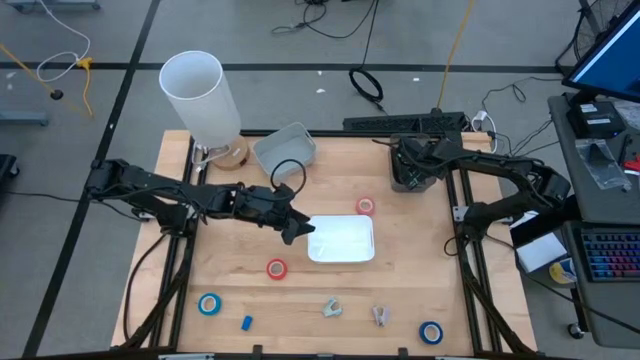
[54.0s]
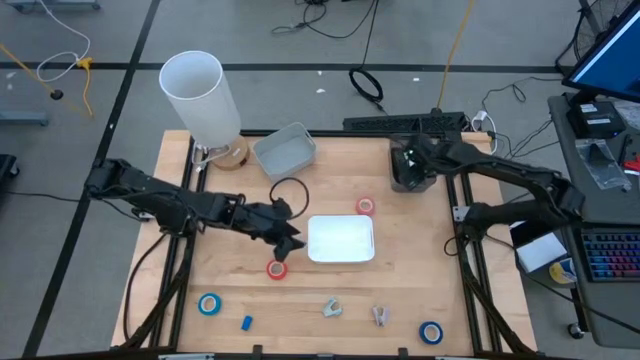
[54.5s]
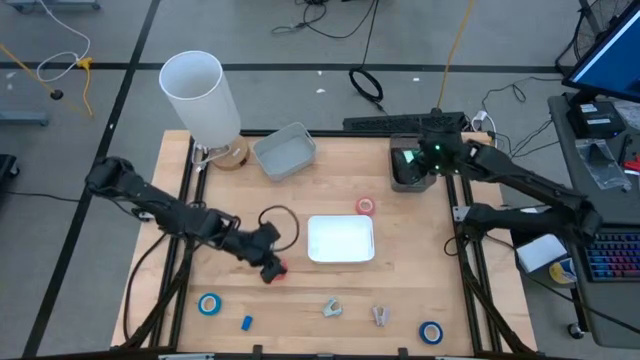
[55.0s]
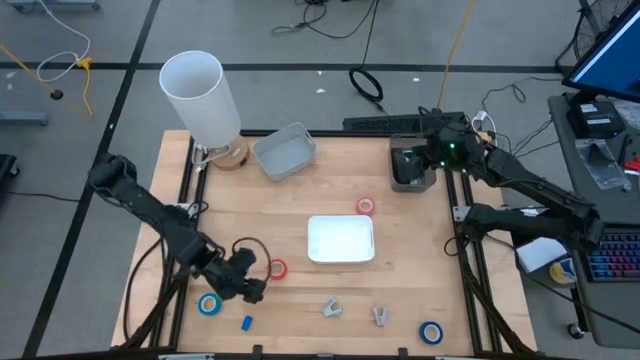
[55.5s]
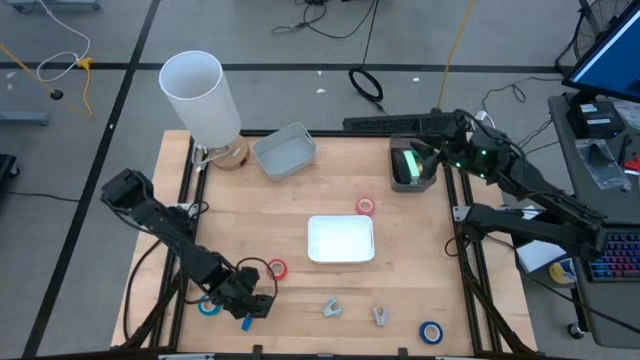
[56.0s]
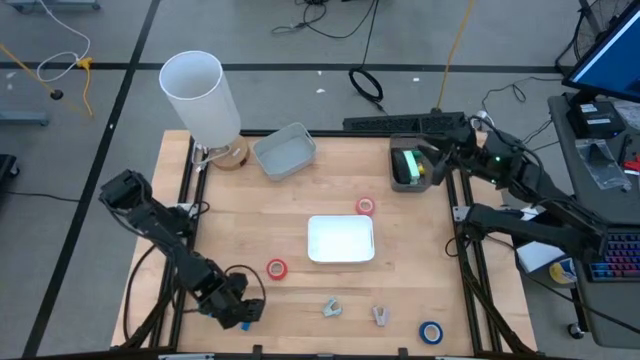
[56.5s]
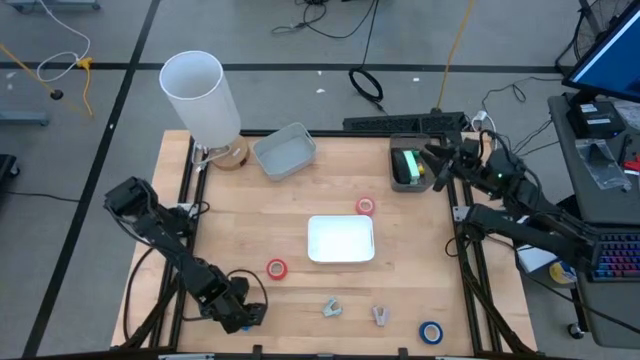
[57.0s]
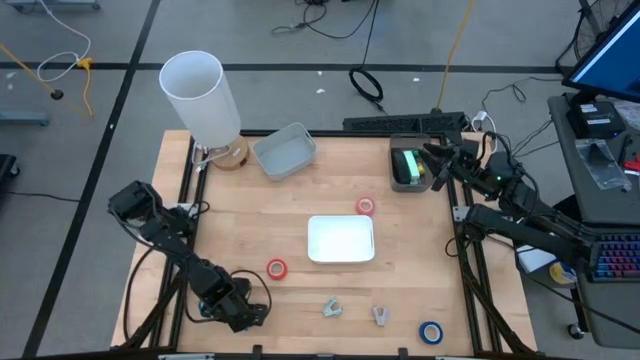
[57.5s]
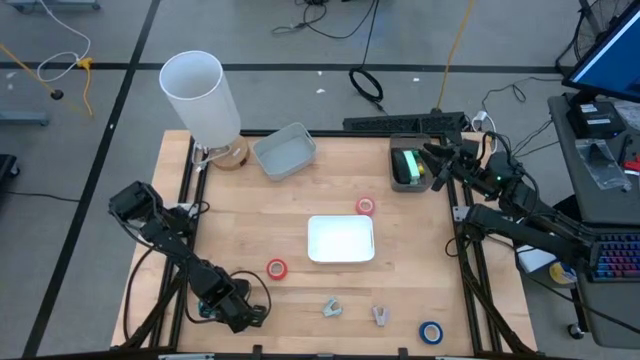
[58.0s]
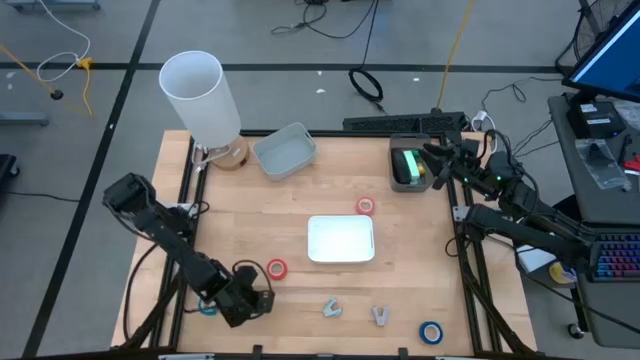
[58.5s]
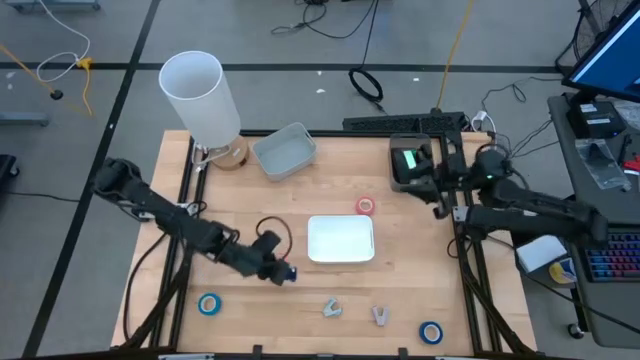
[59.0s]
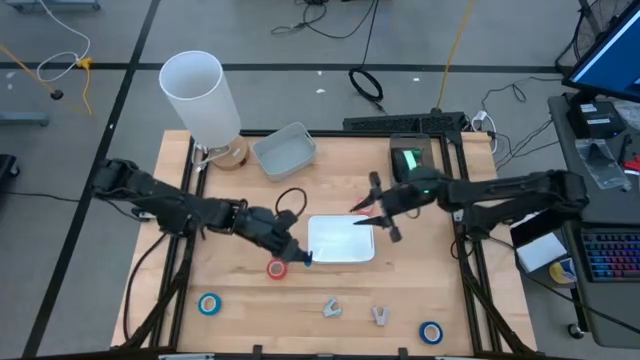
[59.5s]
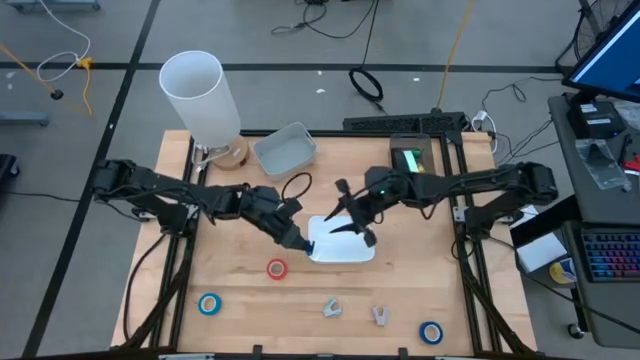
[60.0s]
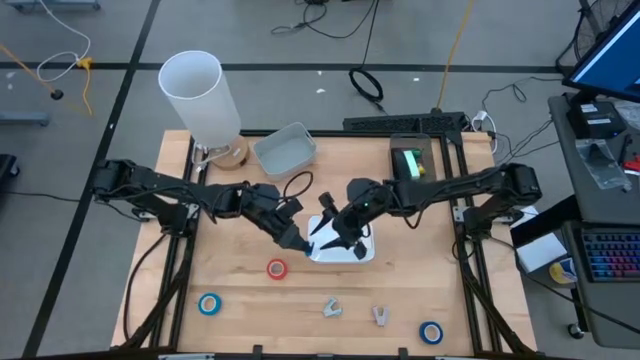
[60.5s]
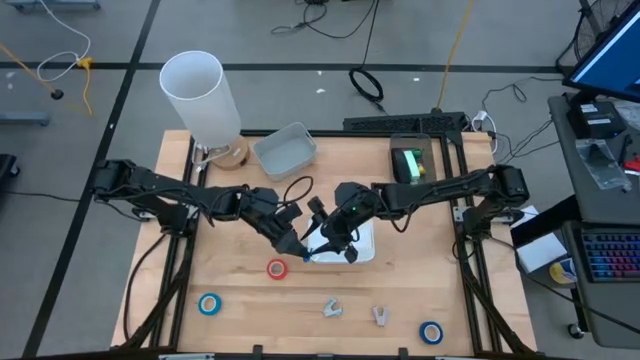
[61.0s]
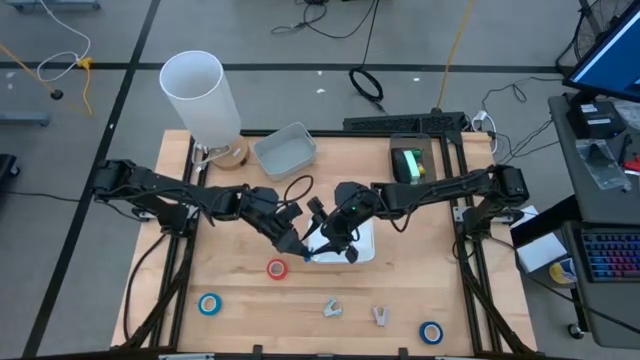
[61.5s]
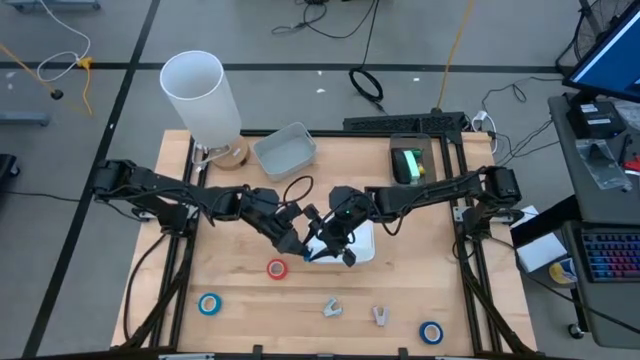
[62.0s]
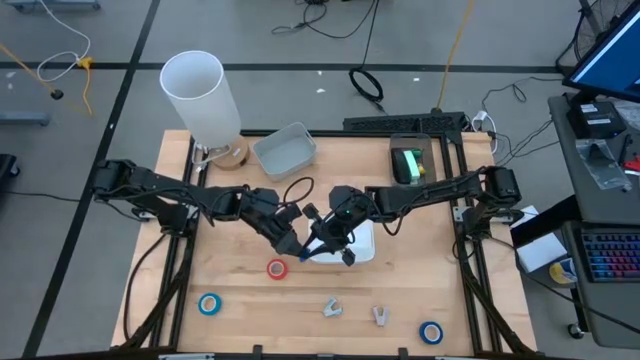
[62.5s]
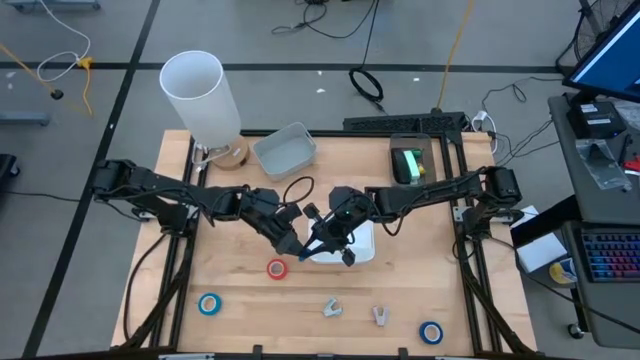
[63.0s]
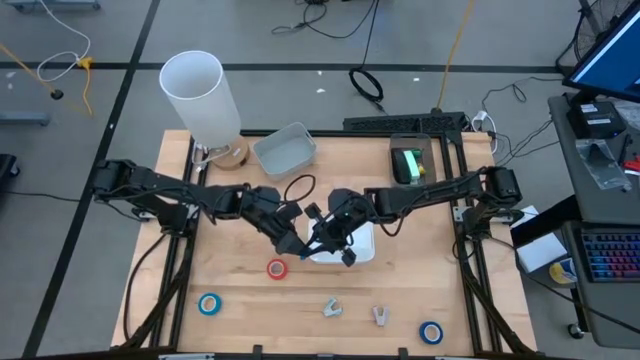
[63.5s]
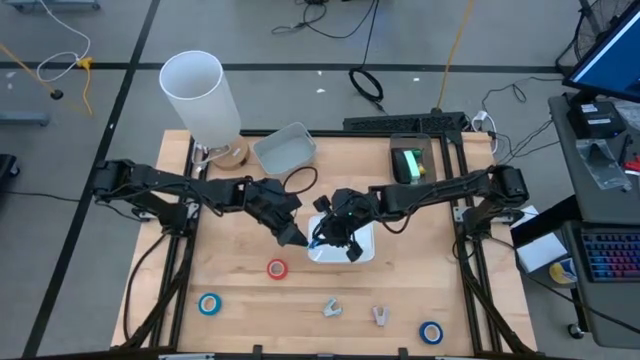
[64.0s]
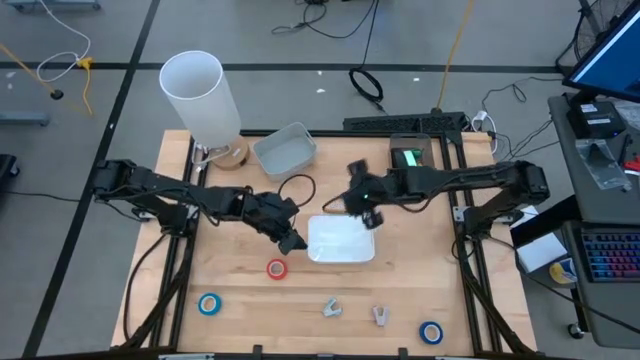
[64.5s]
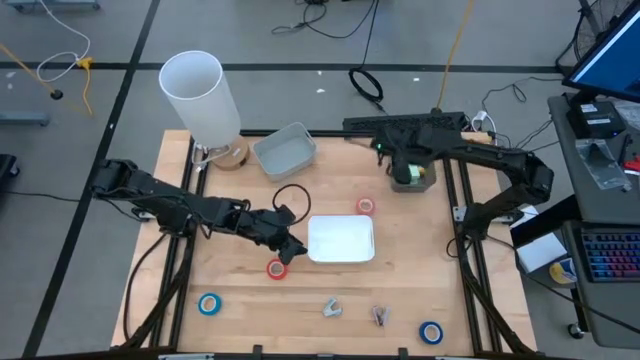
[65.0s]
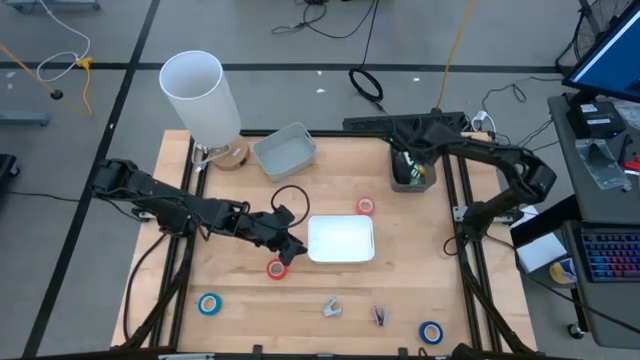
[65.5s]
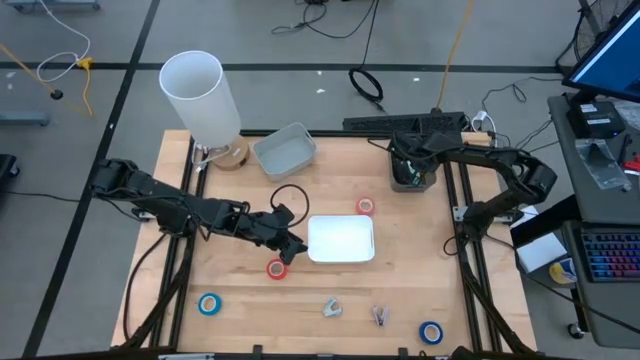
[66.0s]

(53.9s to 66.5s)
Task: Pick and place Stapler, Stapler remover, tape
Put the blue stapler into the black bin

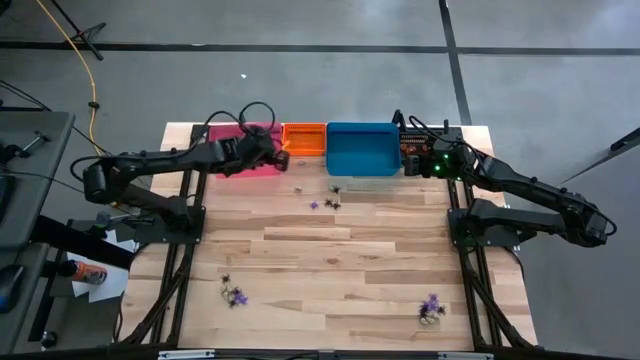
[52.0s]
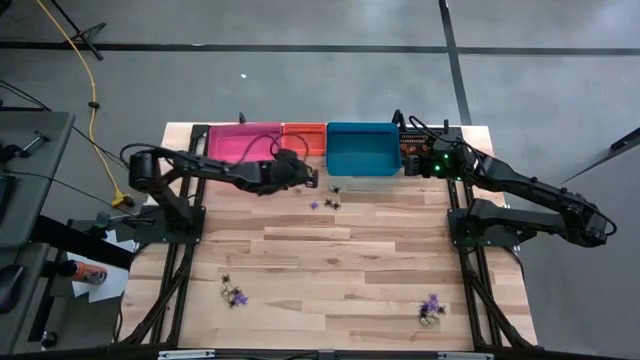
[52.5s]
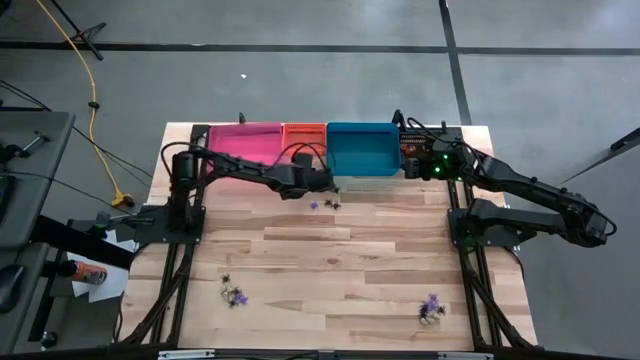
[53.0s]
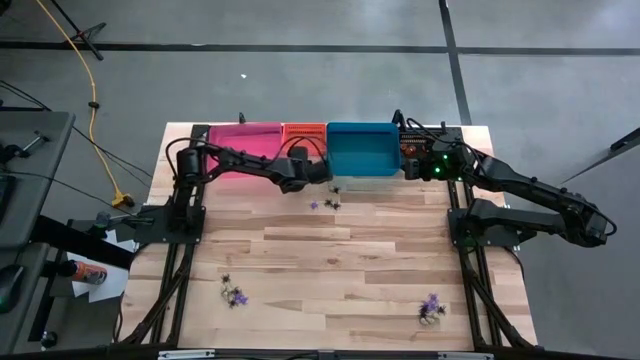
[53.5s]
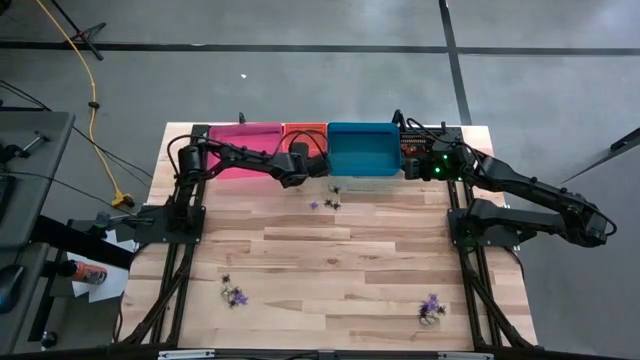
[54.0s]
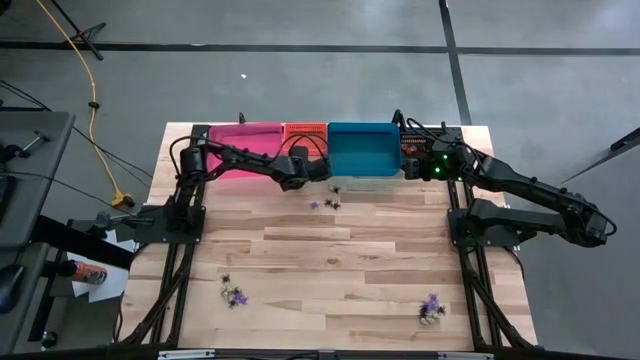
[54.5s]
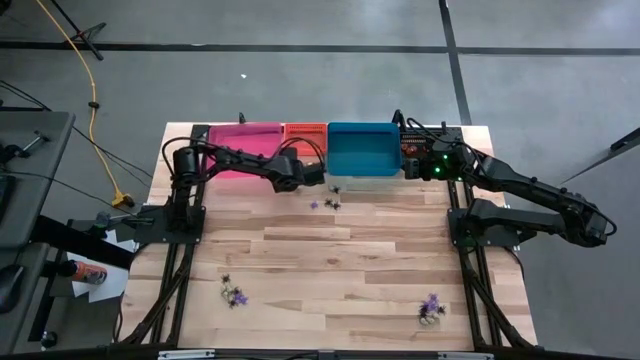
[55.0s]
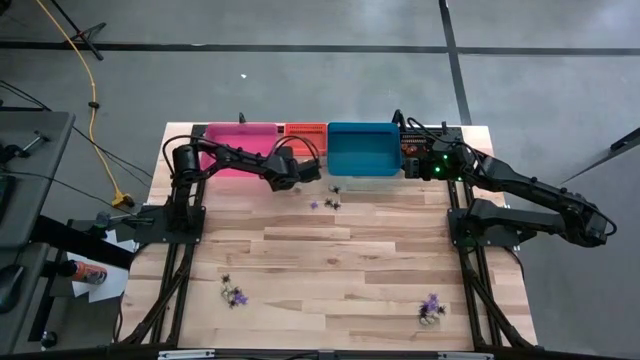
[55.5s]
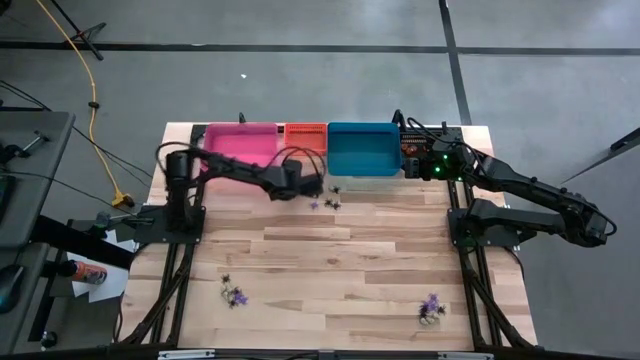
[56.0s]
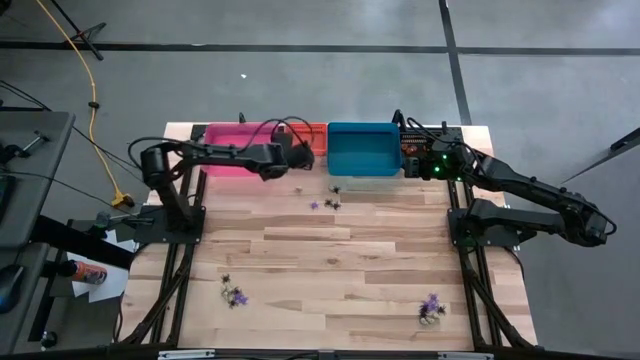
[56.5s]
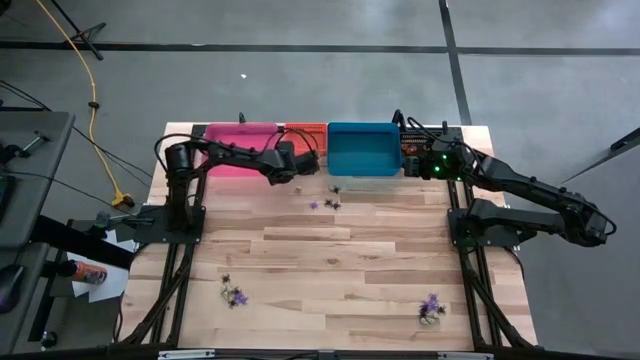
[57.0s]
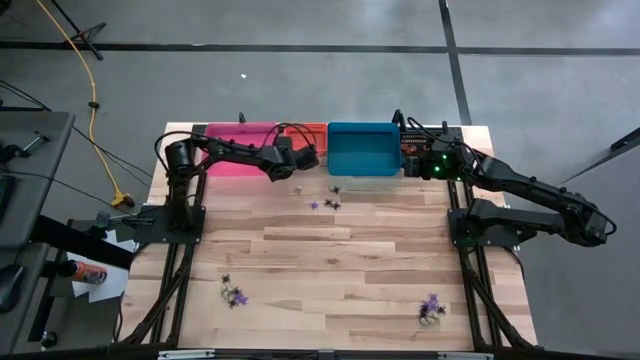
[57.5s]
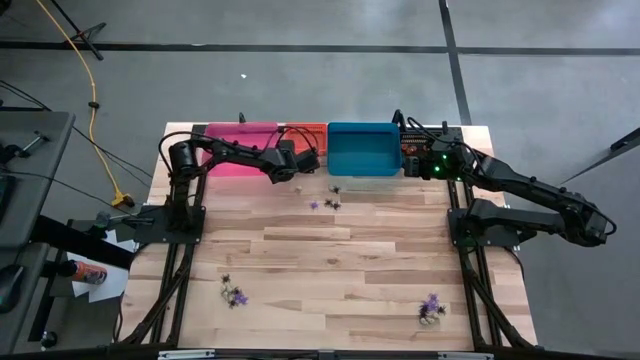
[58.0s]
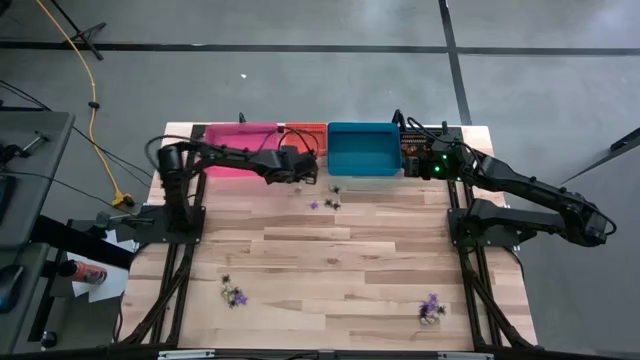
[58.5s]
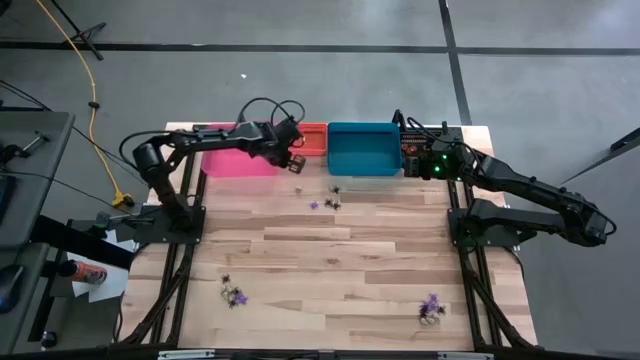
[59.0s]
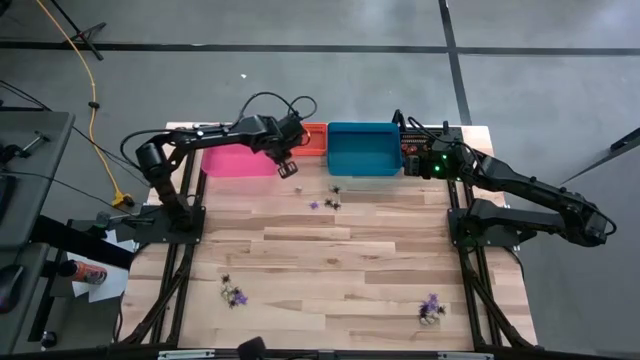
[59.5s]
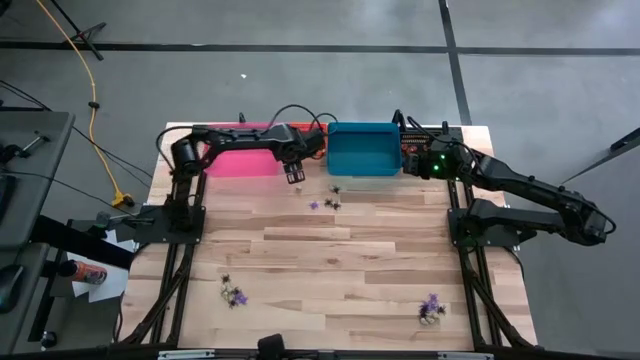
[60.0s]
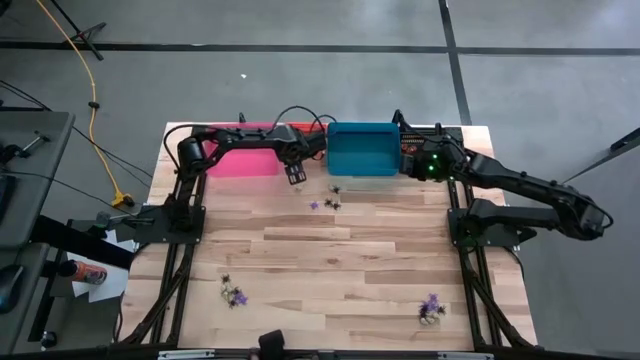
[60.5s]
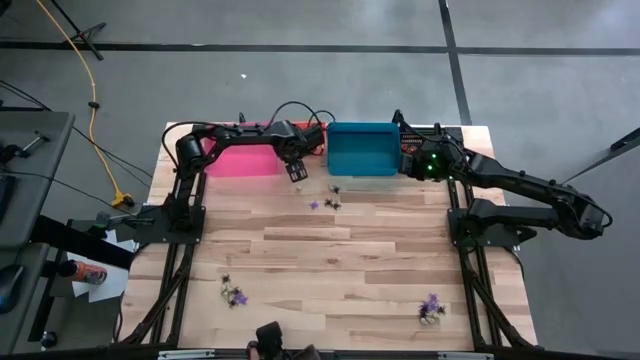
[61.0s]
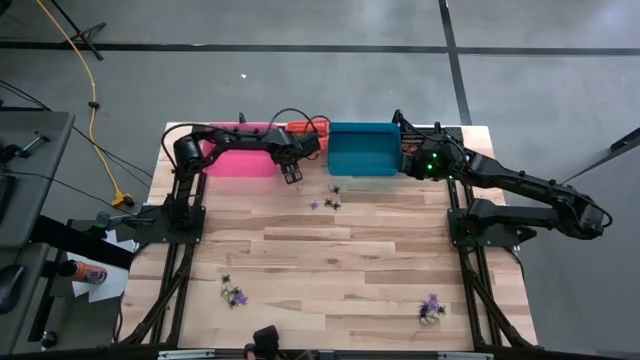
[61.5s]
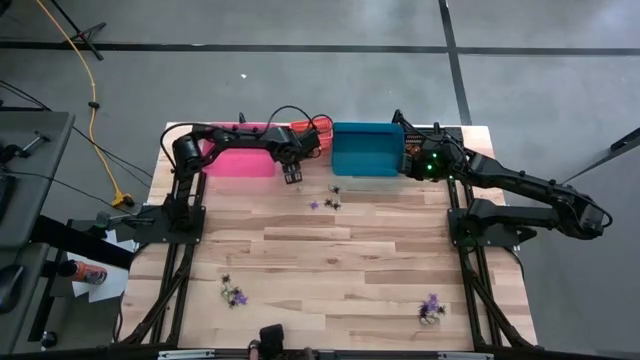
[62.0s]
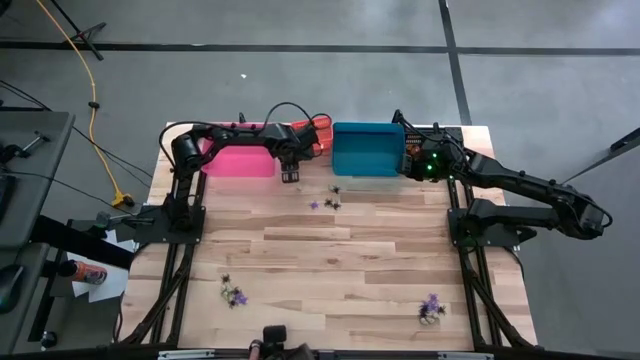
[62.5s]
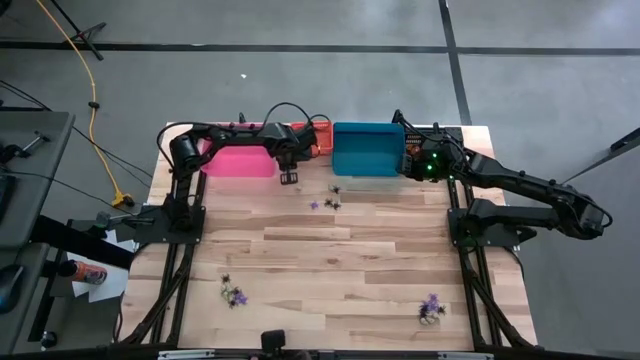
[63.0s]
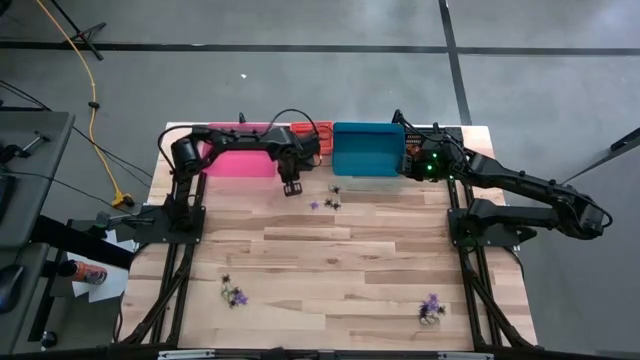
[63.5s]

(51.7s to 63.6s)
Task: Sort Halloween decoration
Put the white skull toy into the pink bin
